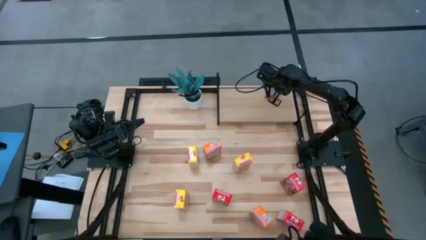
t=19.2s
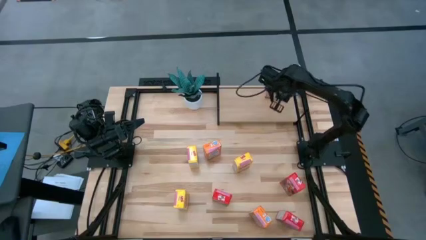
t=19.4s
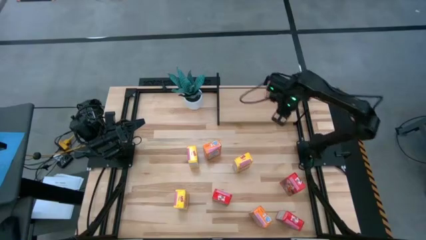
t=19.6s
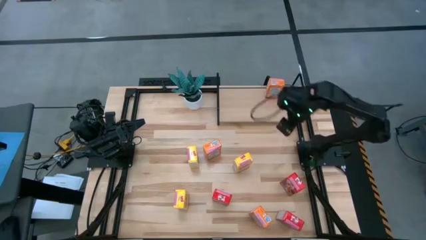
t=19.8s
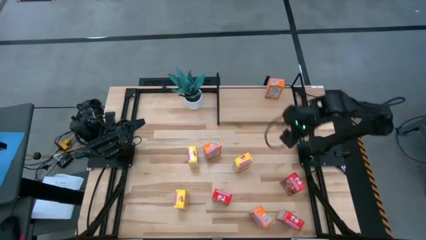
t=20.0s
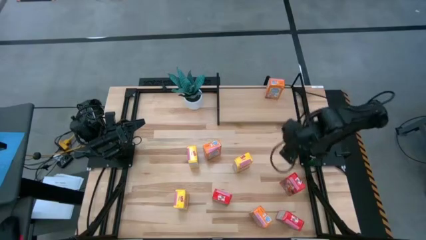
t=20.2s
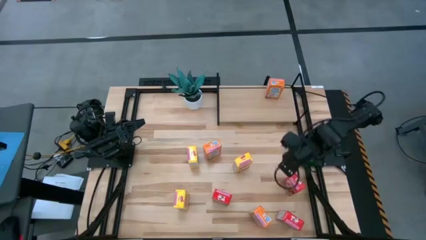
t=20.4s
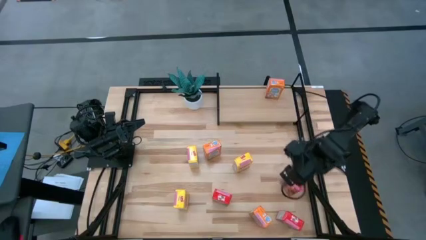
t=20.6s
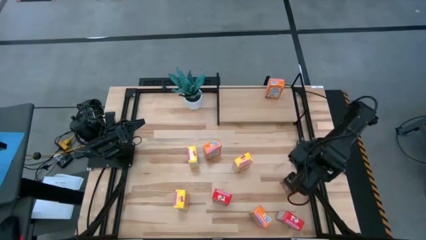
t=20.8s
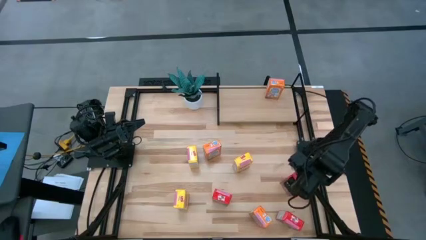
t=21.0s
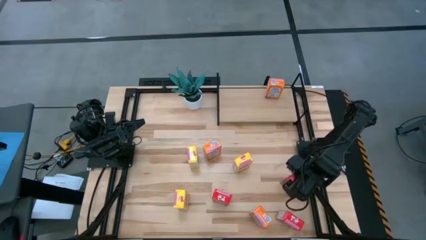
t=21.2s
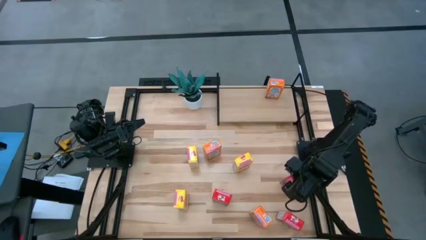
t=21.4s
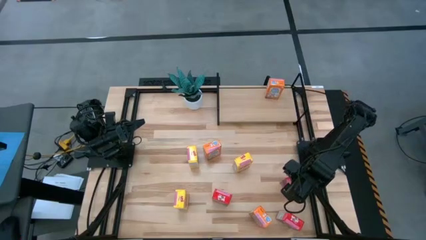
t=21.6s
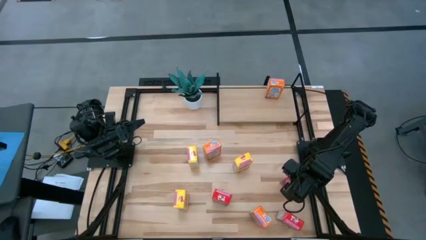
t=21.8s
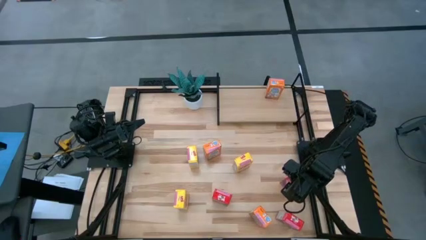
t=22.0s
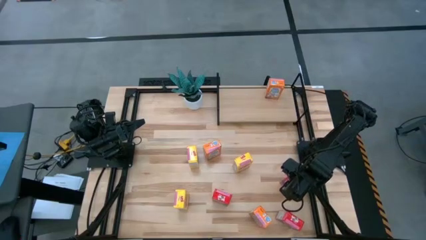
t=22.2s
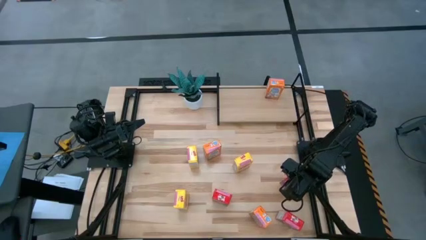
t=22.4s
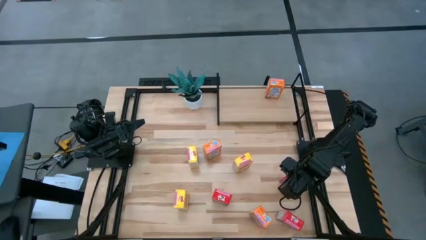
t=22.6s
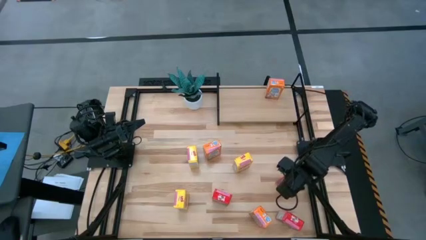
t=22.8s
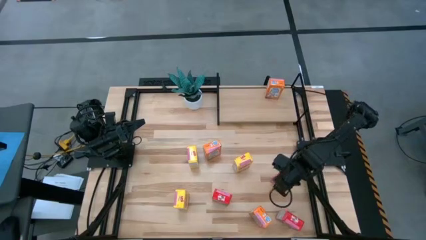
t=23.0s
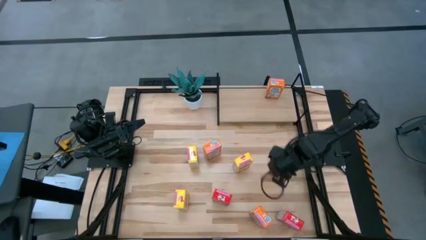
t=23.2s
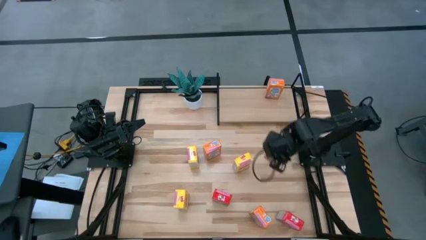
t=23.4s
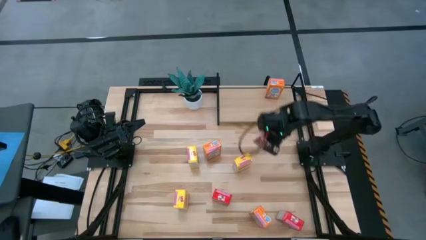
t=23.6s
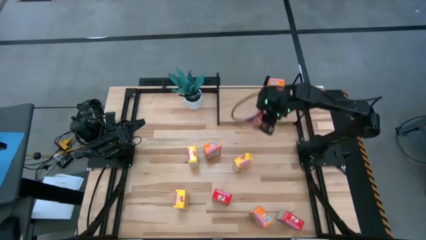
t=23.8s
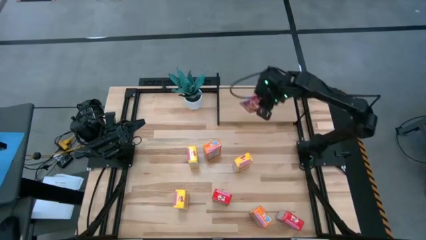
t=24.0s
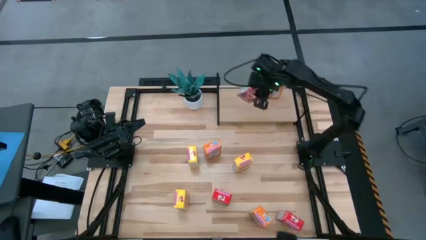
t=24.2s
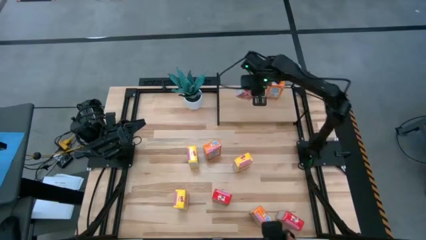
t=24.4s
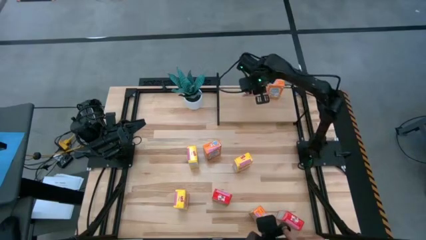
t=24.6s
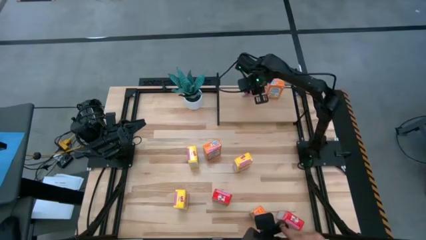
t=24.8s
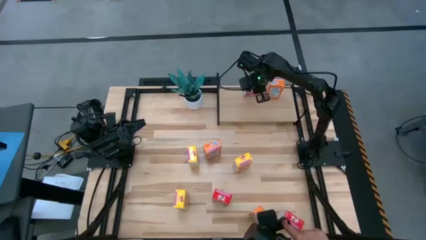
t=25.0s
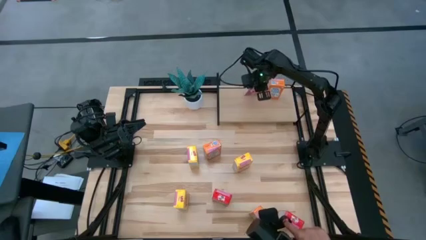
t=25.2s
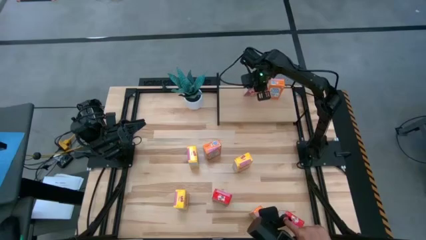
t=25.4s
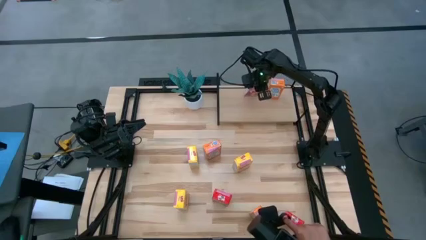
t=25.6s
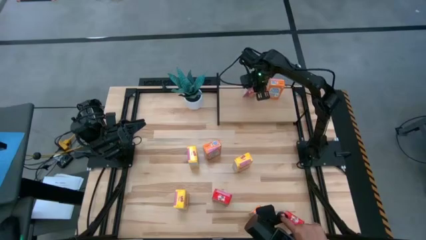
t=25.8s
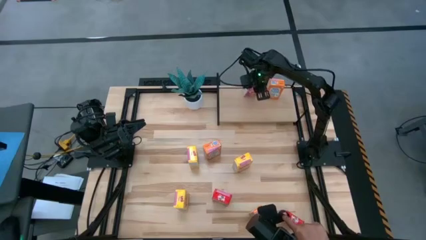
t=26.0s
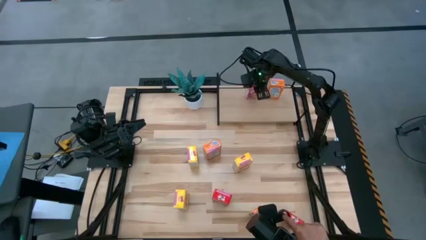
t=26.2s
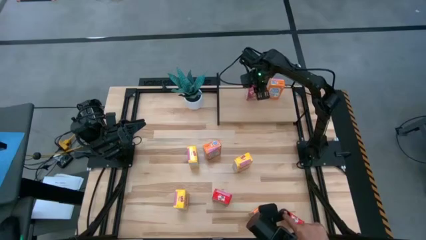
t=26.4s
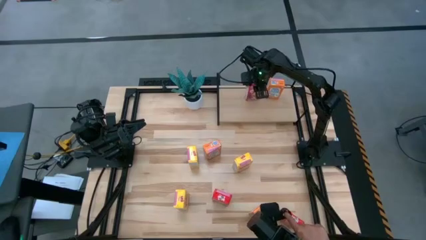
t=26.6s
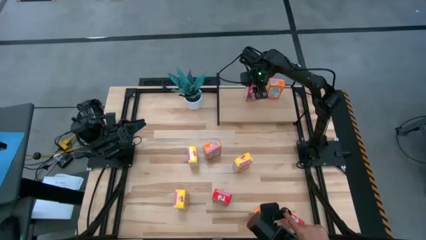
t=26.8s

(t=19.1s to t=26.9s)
Task: Stack cereal on shelf
Put the top right red cereal box on the shelf

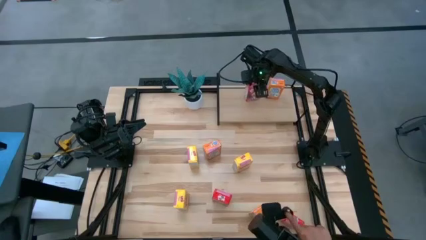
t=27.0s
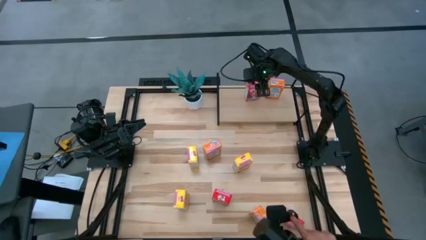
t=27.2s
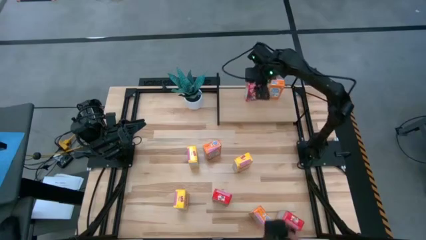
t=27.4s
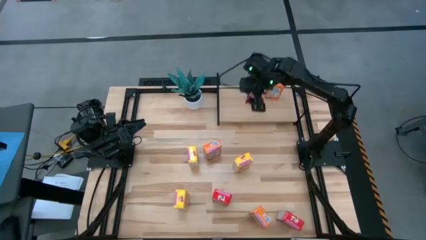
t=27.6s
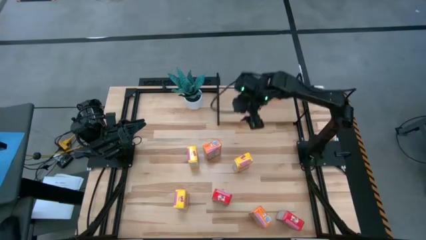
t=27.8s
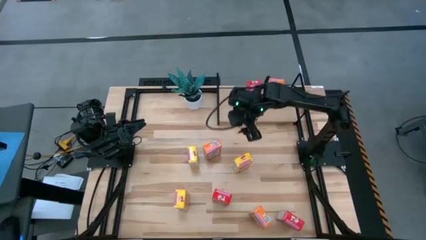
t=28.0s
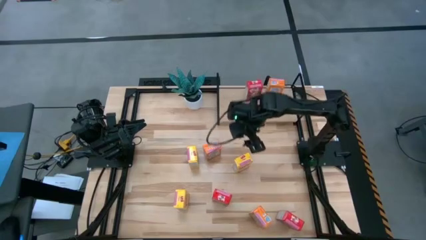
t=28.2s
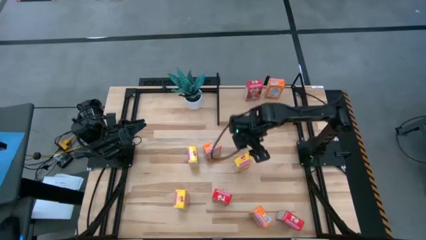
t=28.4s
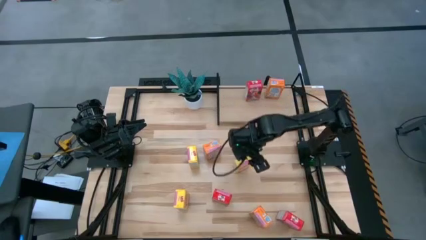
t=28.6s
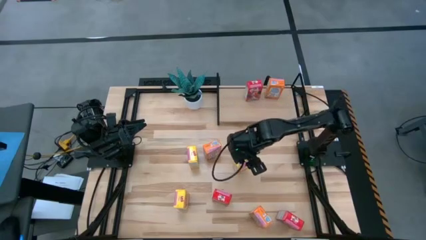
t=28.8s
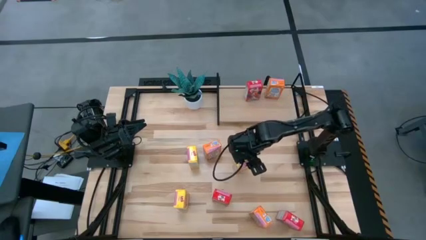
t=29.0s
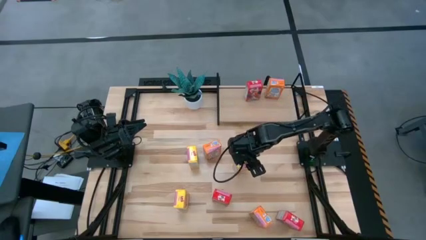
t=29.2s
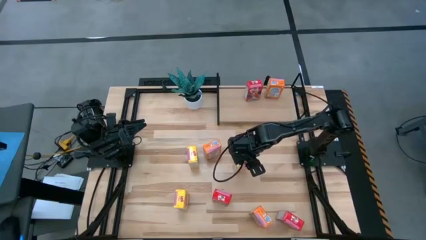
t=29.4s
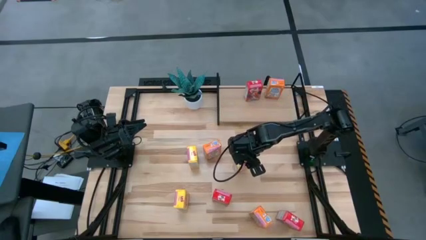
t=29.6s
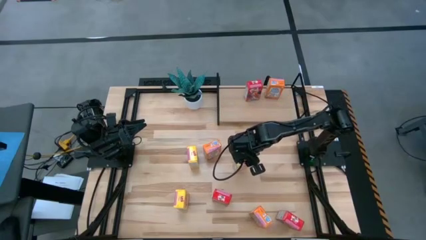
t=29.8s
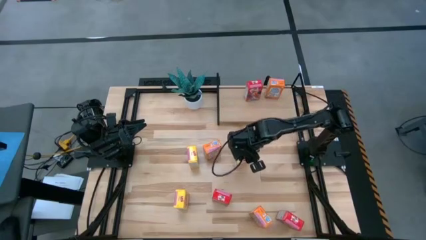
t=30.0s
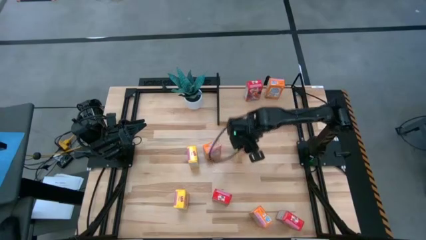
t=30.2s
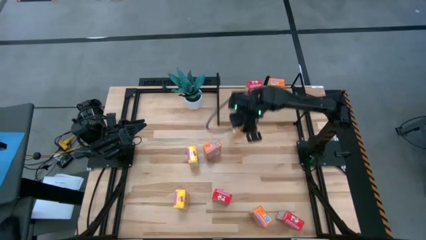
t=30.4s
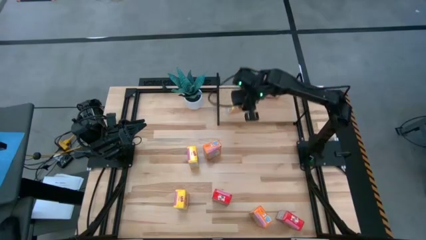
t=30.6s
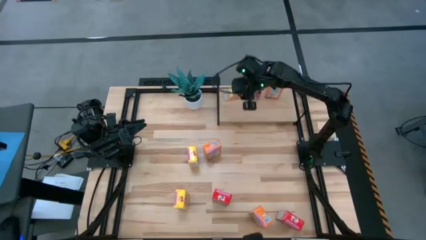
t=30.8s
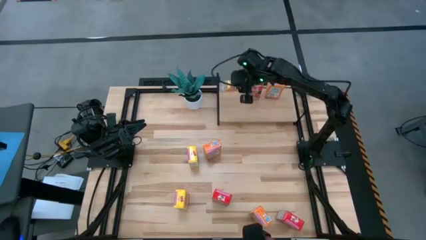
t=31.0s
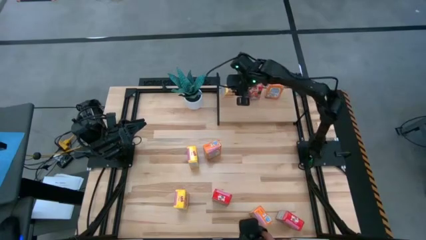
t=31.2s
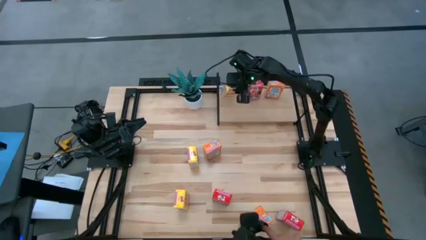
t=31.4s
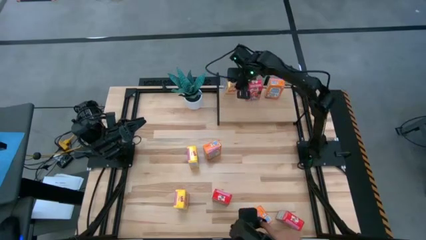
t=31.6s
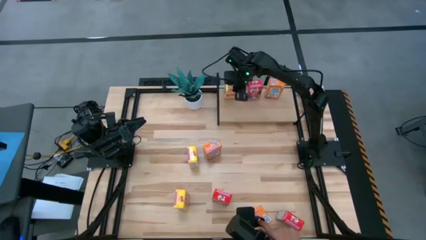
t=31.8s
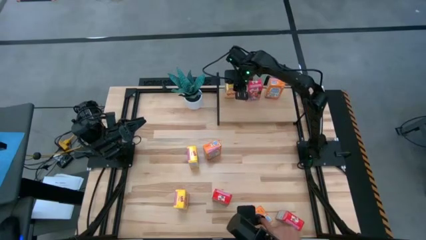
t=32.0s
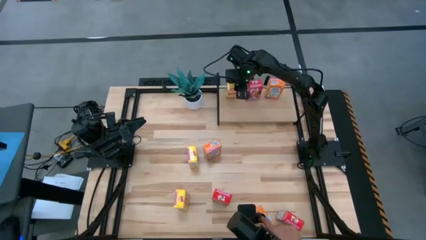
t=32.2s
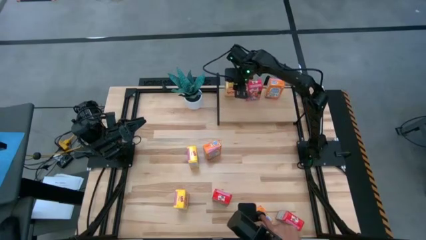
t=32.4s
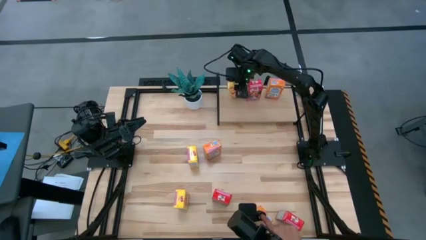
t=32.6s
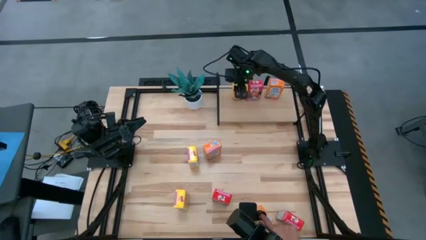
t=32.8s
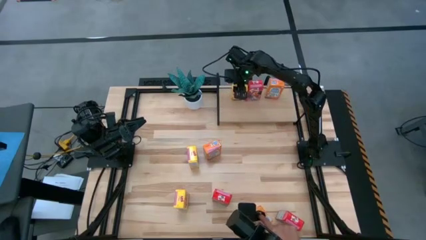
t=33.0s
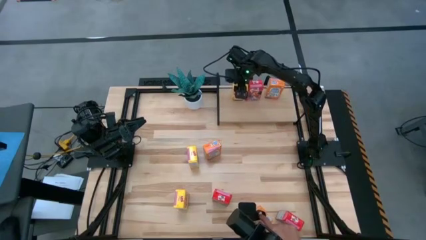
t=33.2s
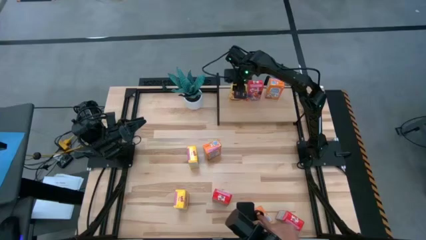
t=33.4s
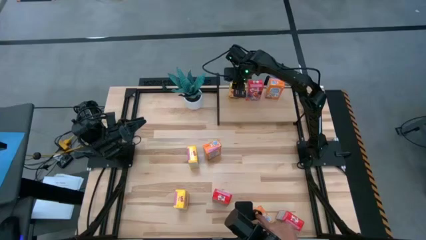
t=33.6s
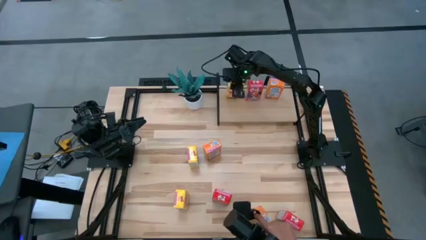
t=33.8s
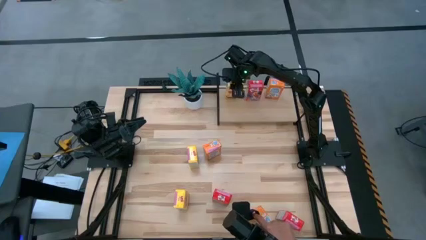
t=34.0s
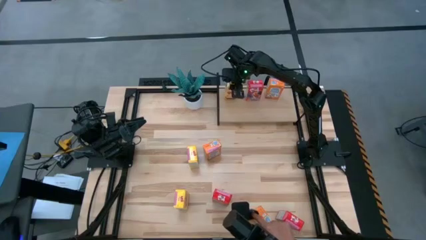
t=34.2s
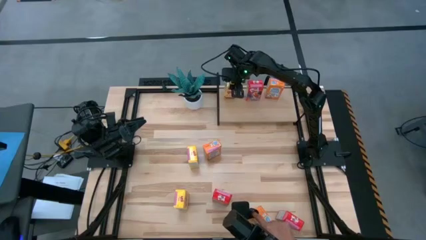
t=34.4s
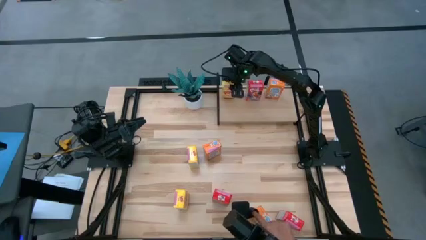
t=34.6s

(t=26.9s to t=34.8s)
Put the top right yellow cereal box on the shelf
